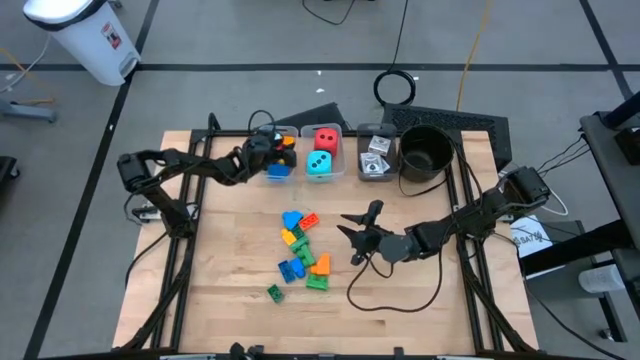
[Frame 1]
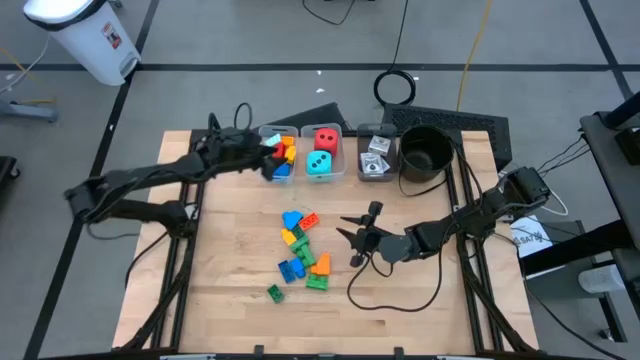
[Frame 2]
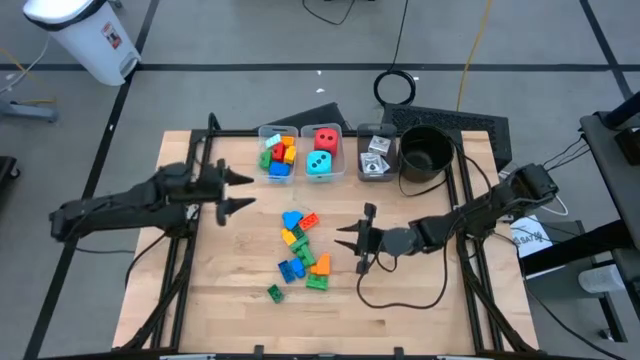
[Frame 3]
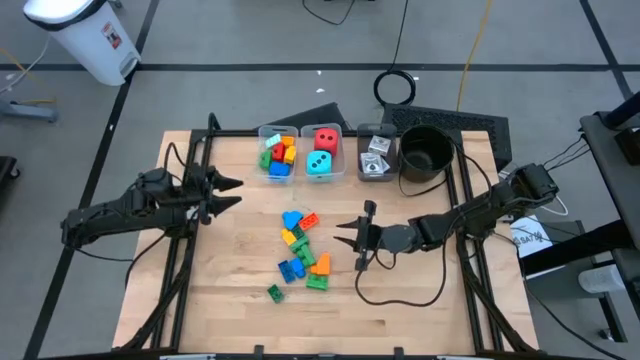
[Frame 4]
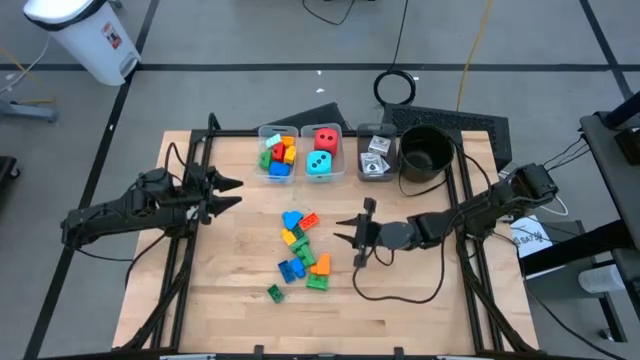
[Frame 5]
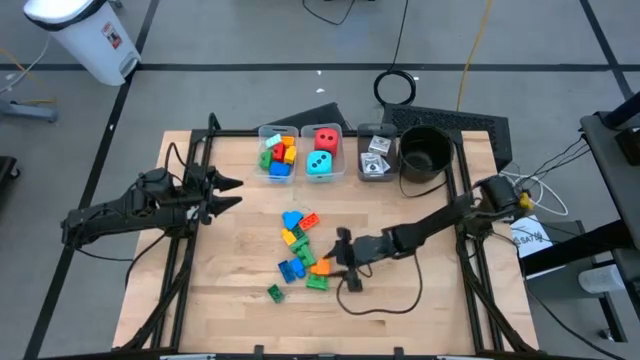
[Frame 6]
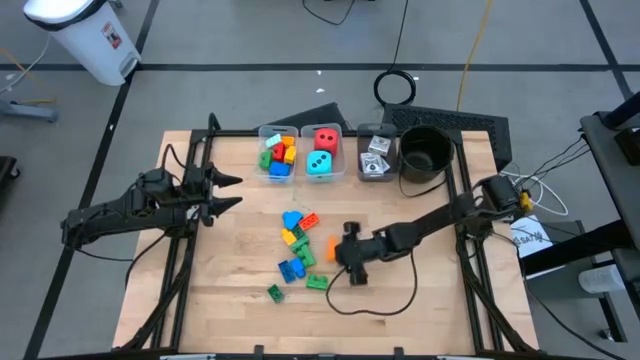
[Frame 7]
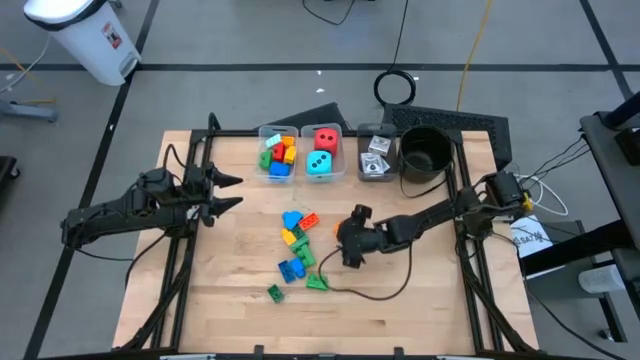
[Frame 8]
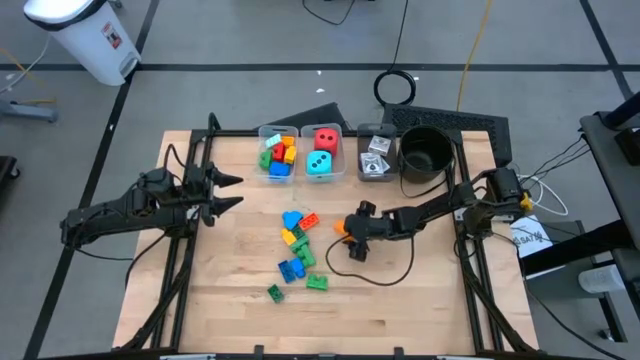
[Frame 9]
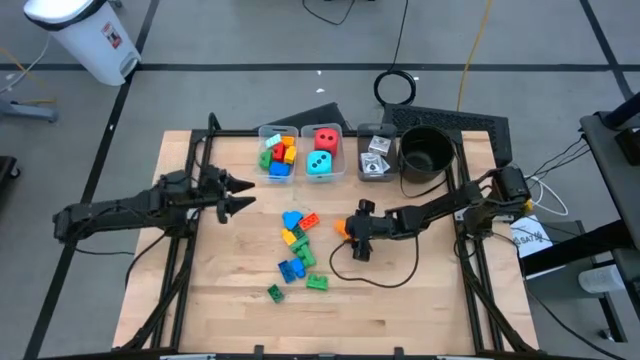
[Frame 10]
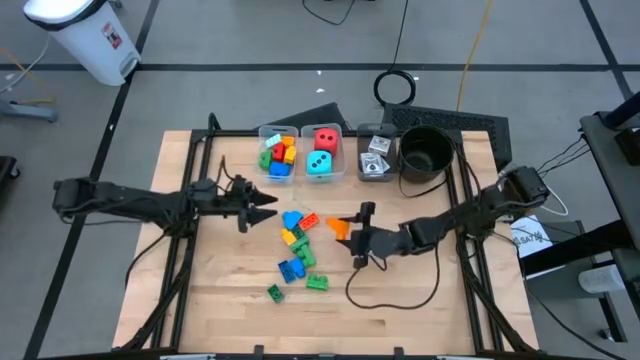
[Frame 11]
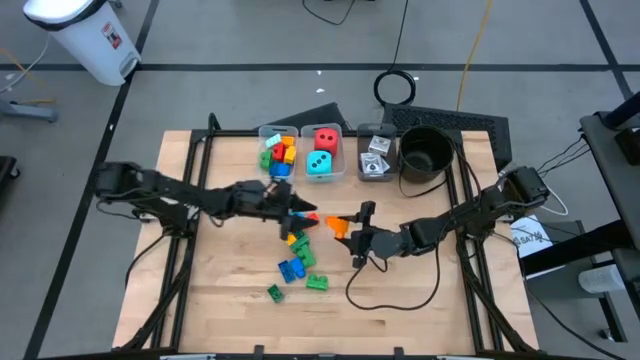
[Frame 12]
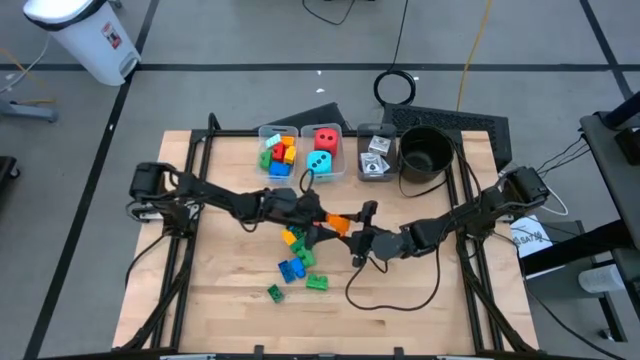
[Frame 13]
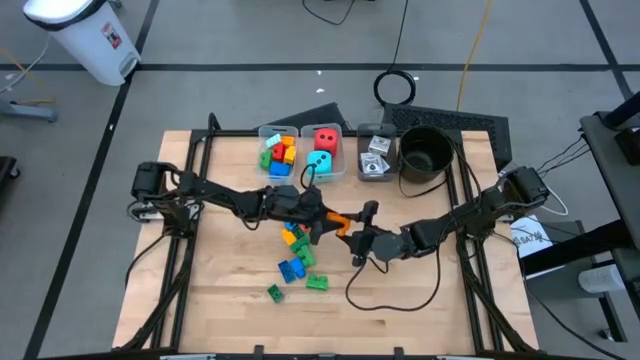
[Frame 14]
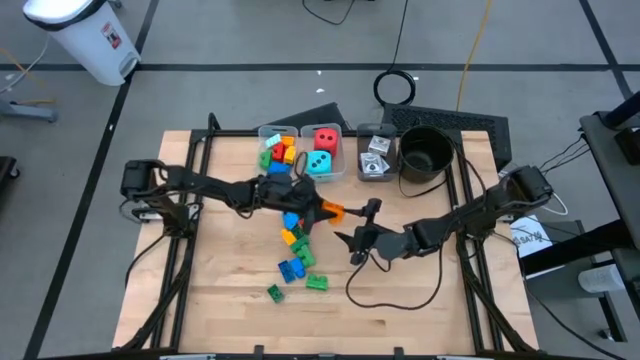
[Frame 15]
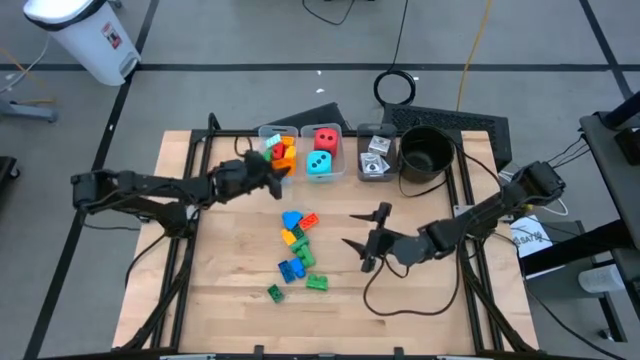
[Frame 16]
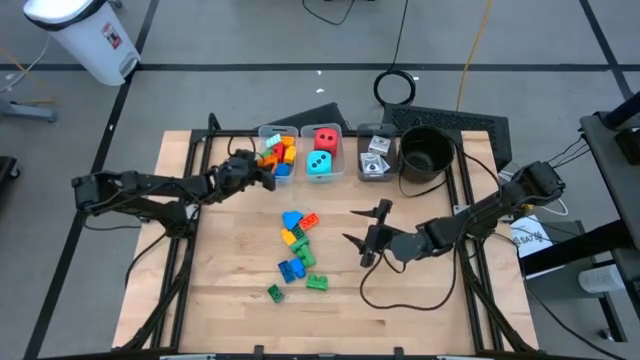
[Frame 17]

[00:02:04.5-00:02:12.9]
Task: Pick & Place Toys
Put the dark yellow game piece into the left transparent bin

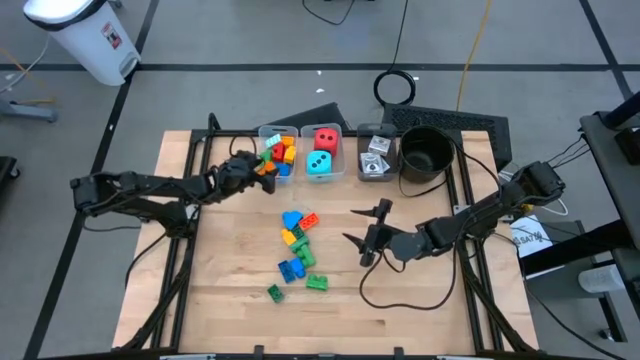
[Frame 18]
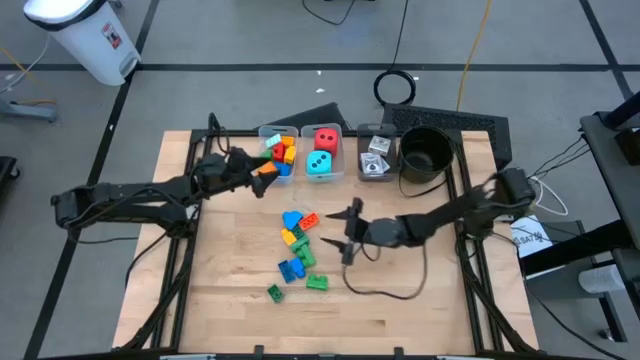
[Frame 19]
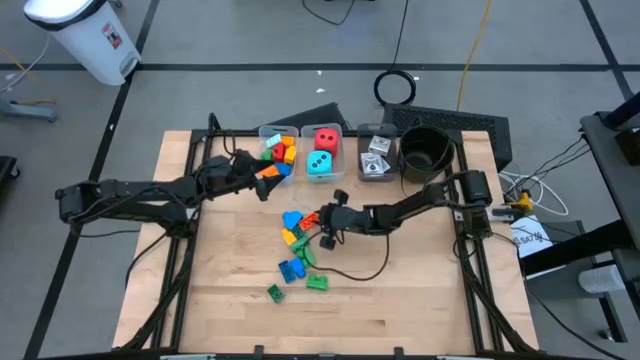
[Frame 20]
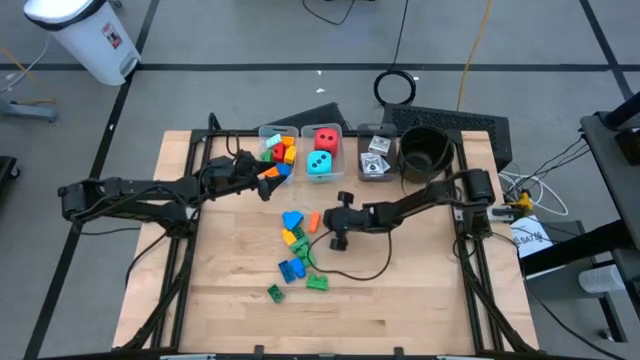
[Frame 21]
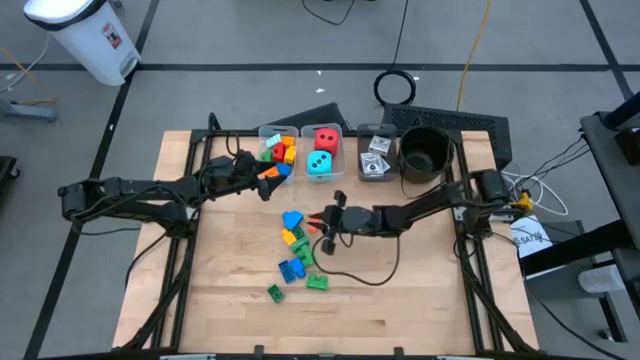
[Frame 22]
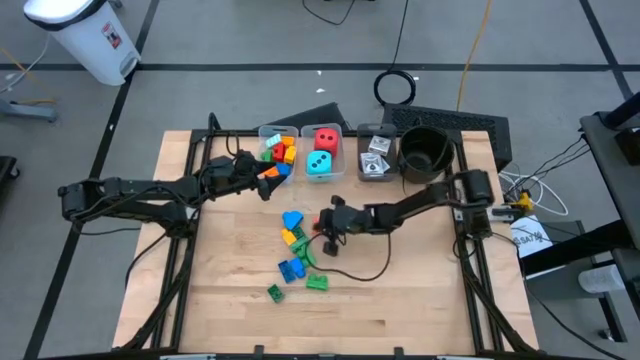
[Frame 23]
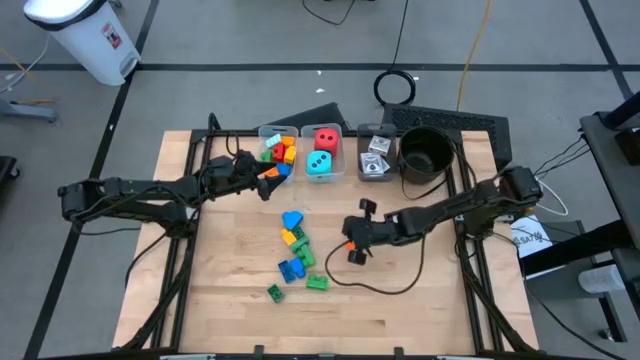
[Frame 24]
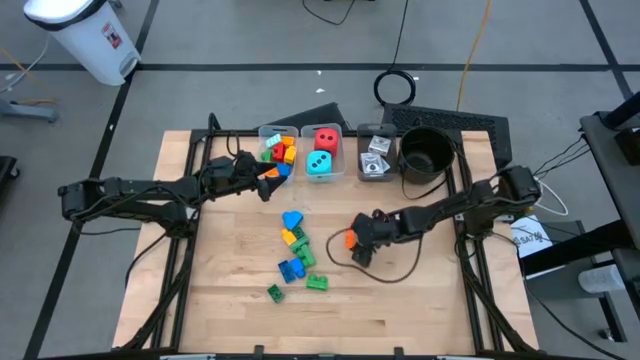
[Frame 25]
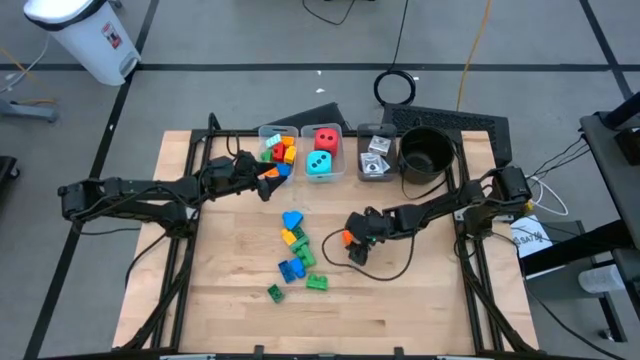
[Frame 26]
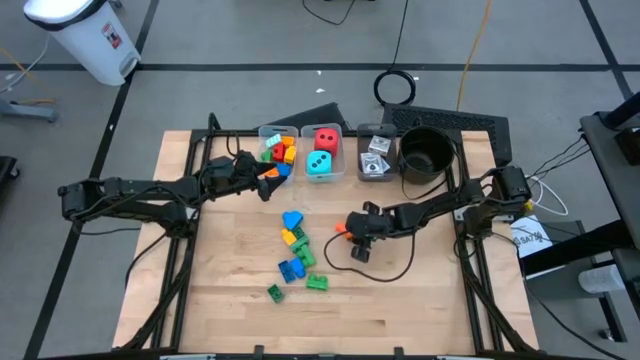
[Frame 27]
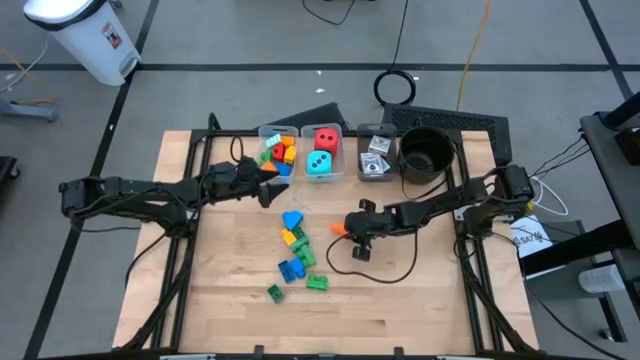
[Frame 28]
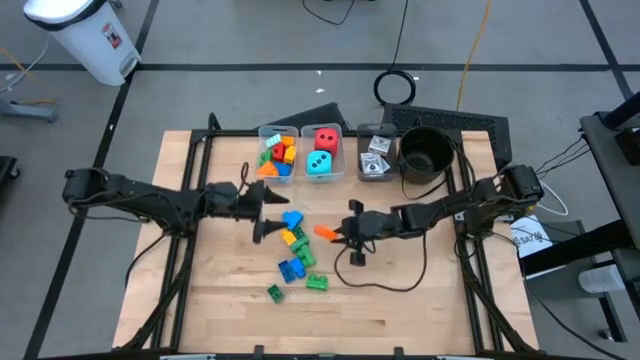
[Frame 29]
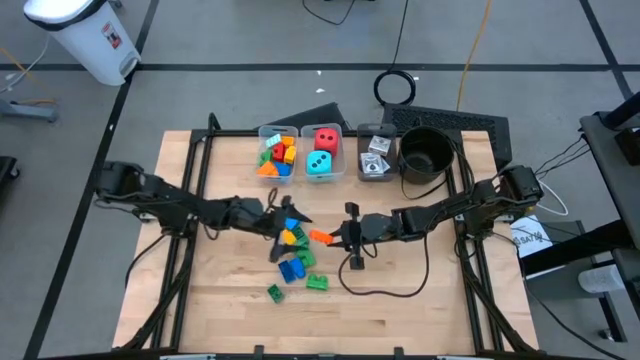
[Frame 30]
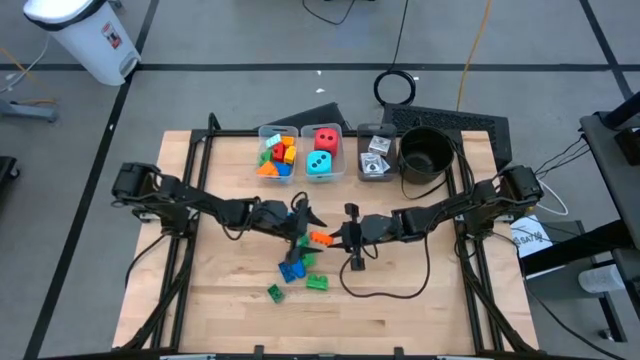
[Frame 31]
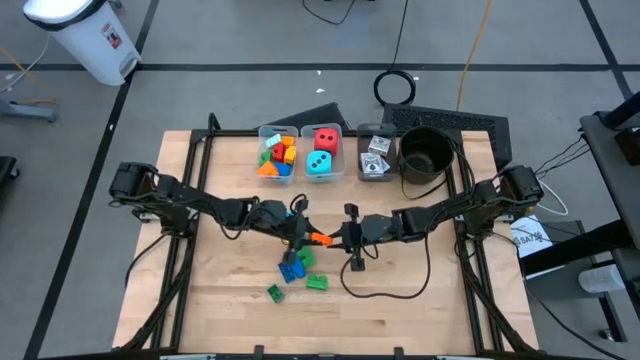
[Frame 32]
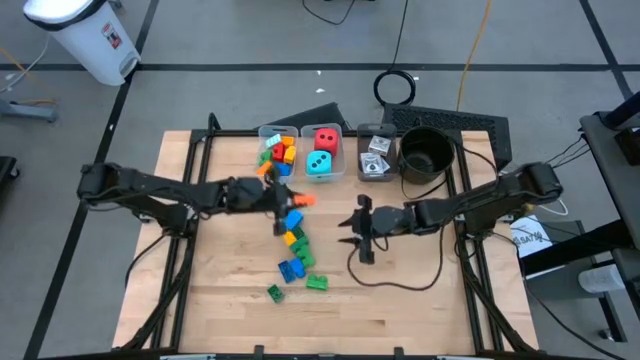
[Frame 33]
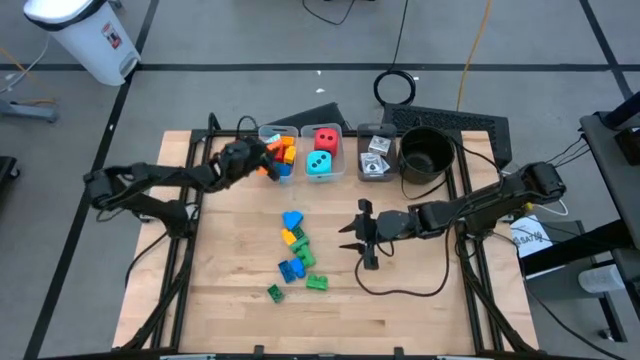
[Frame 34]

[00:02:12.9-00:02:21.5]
Put the orange game piece into the left transparent bin

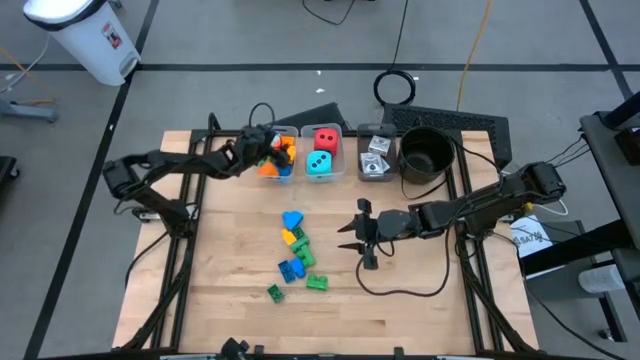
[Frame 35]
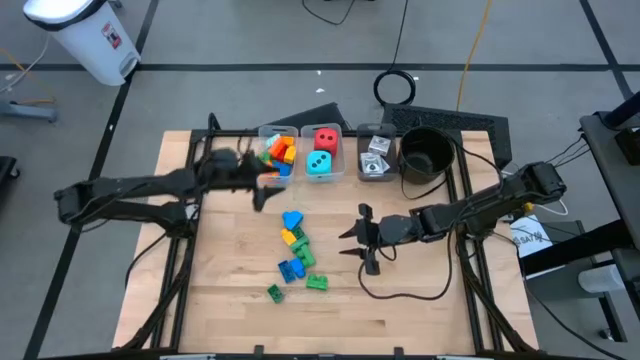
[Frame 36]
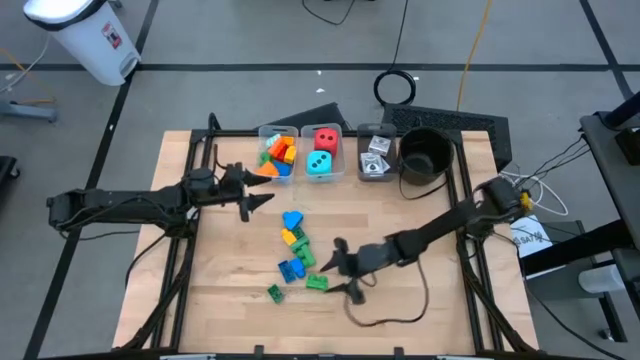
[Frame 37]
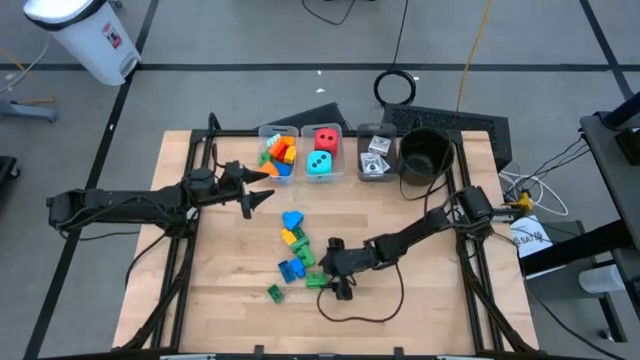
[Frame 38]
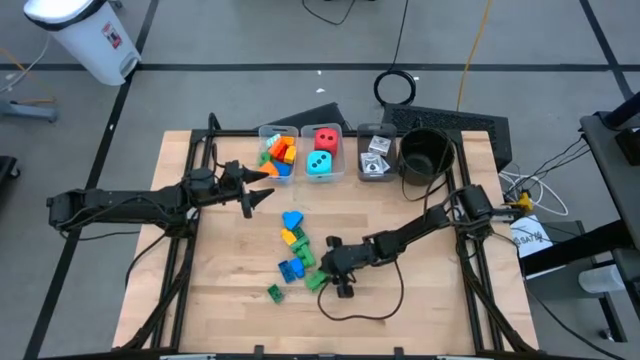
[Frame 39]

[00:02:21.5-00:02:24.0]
Put the green game piece into the left transparent bin
